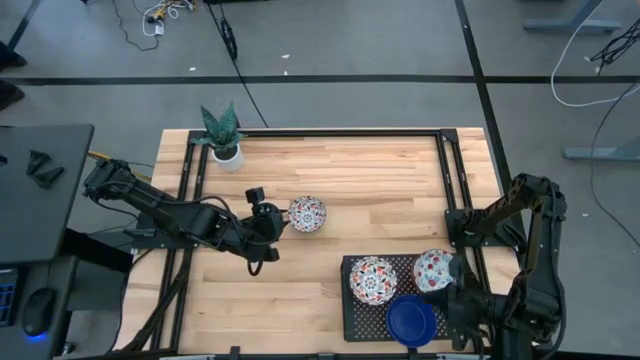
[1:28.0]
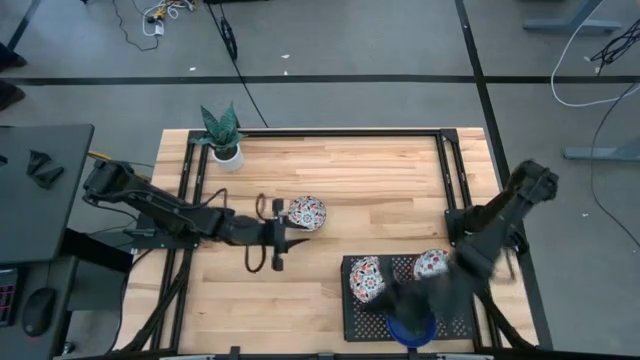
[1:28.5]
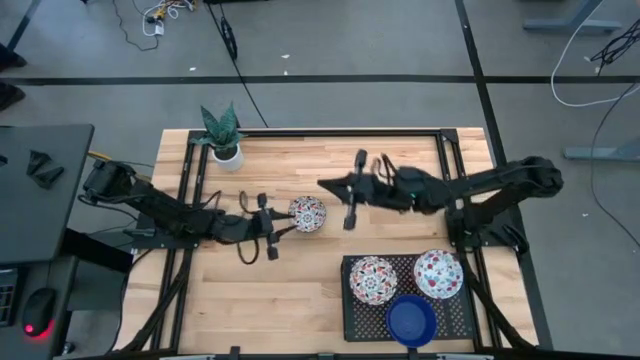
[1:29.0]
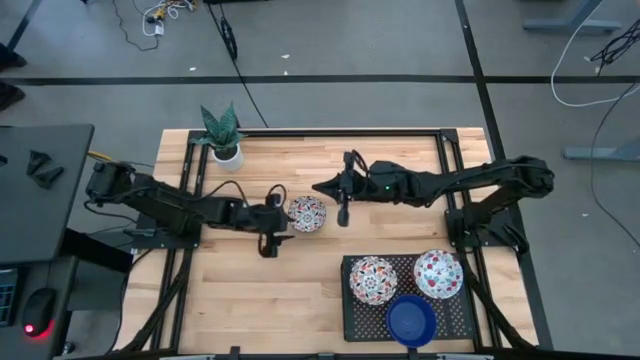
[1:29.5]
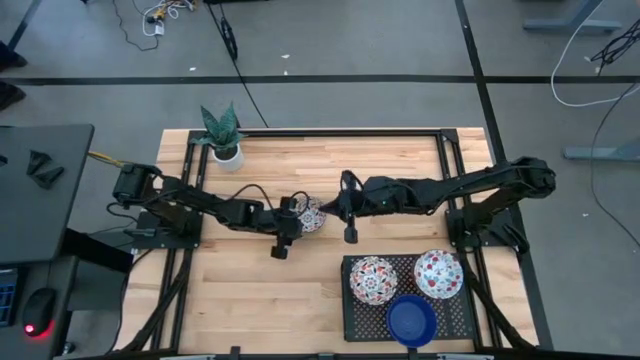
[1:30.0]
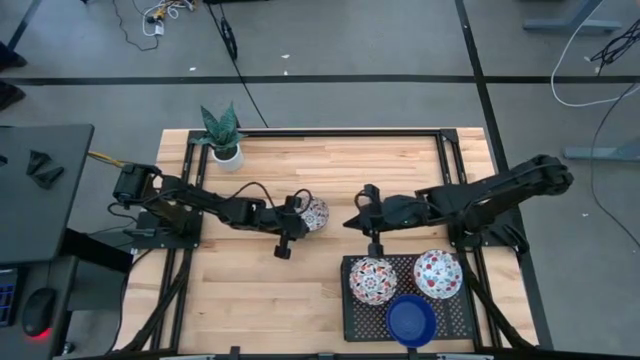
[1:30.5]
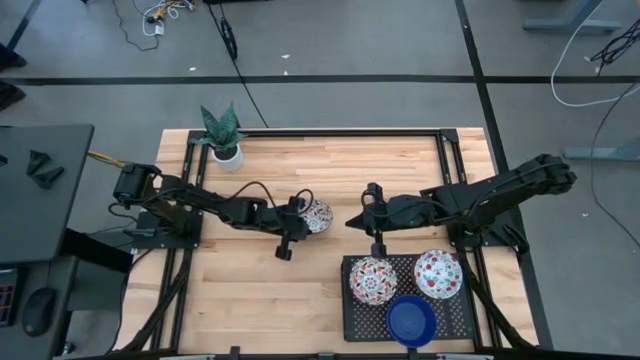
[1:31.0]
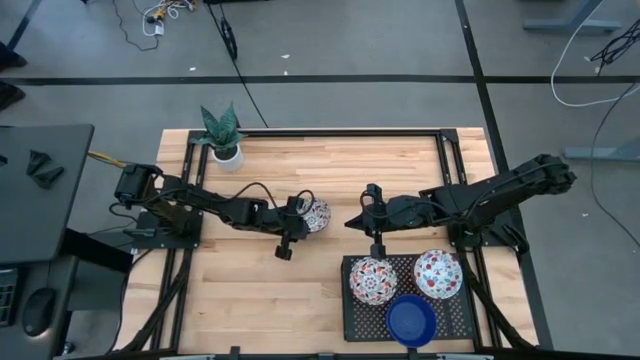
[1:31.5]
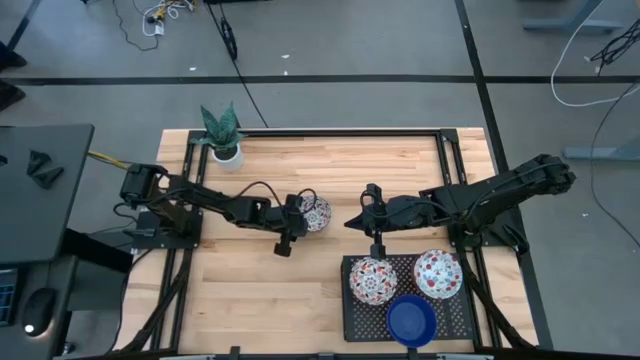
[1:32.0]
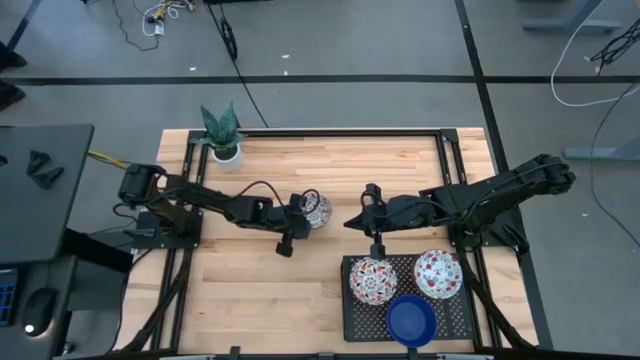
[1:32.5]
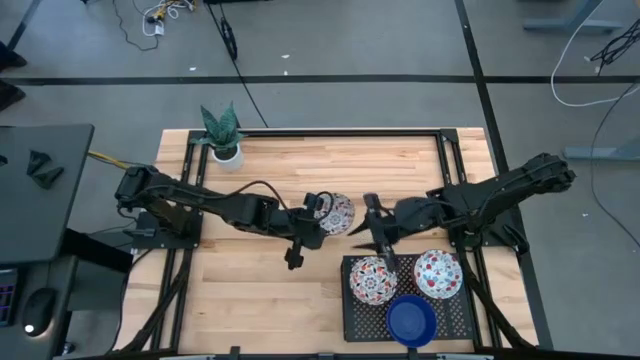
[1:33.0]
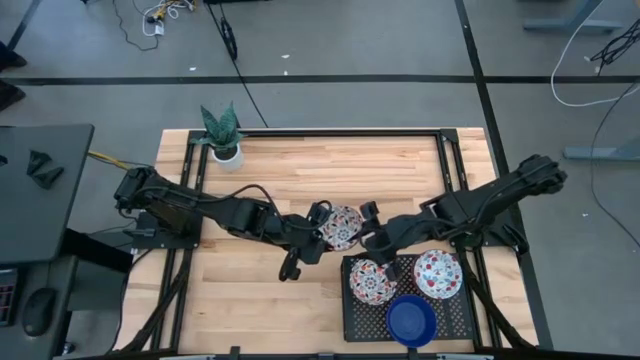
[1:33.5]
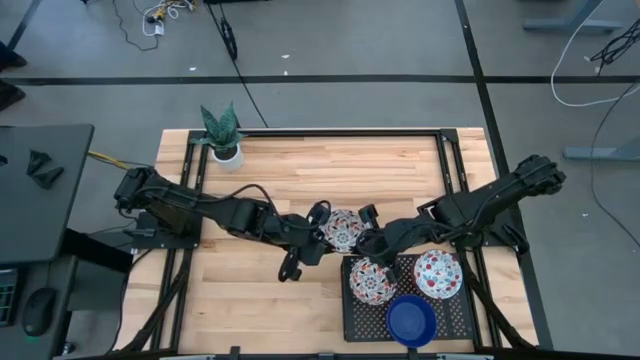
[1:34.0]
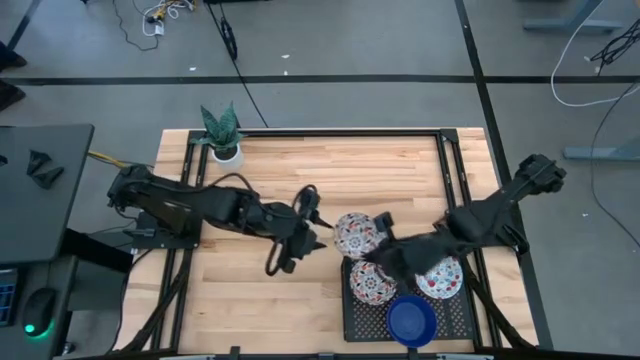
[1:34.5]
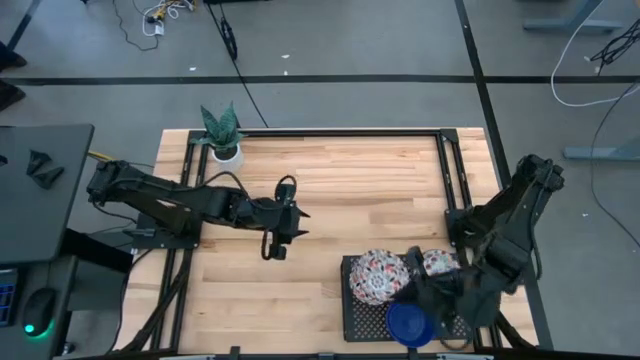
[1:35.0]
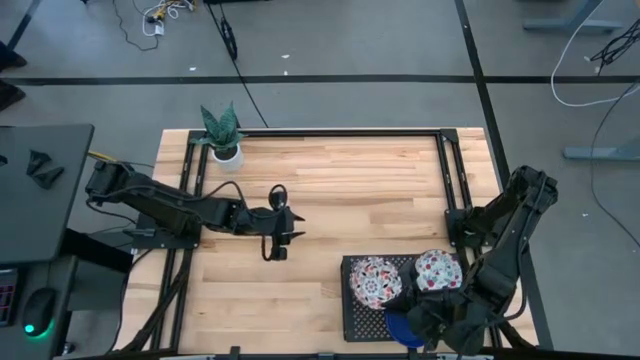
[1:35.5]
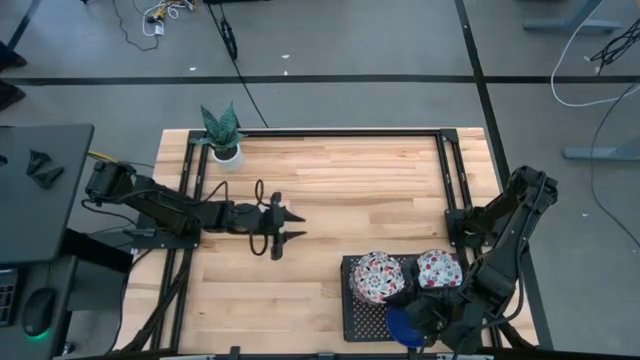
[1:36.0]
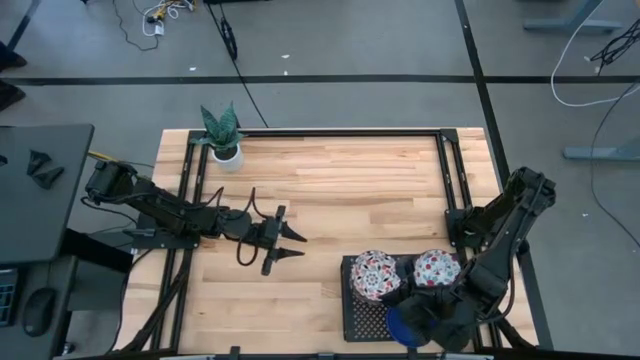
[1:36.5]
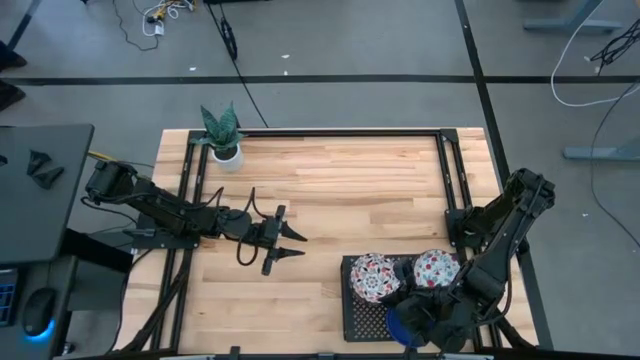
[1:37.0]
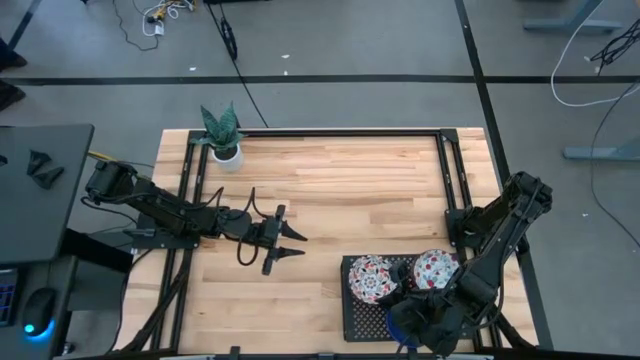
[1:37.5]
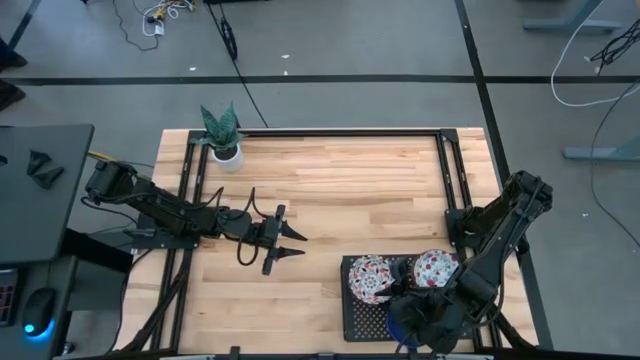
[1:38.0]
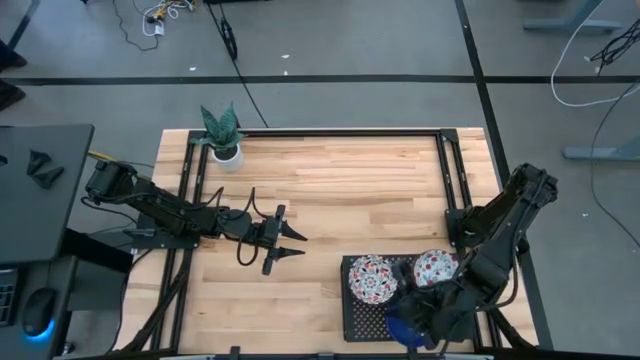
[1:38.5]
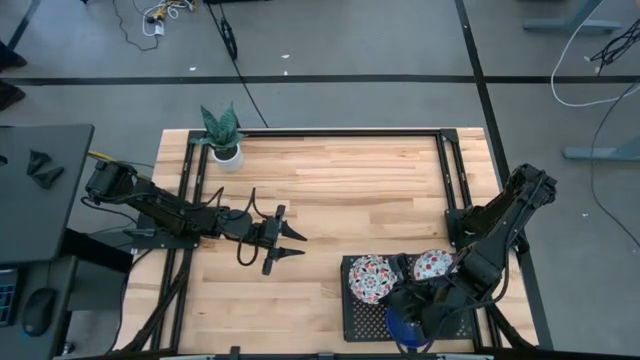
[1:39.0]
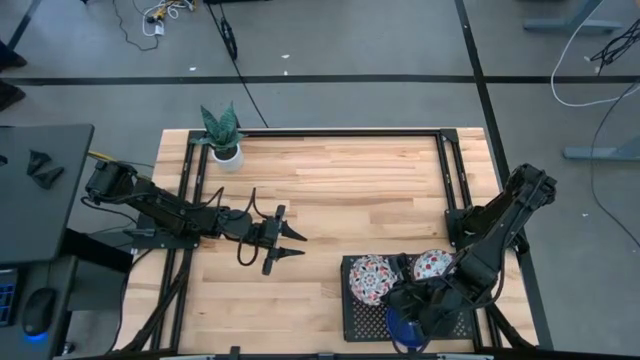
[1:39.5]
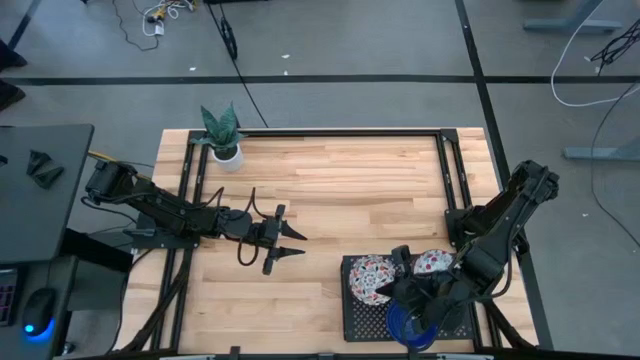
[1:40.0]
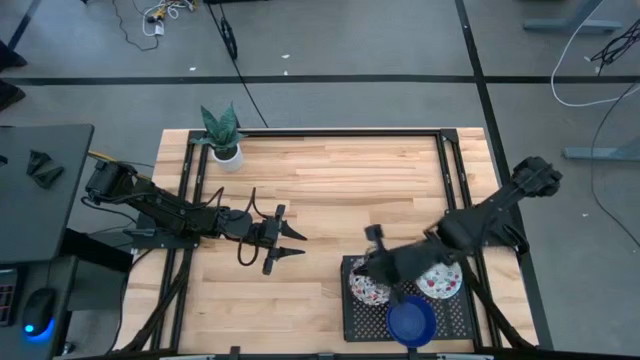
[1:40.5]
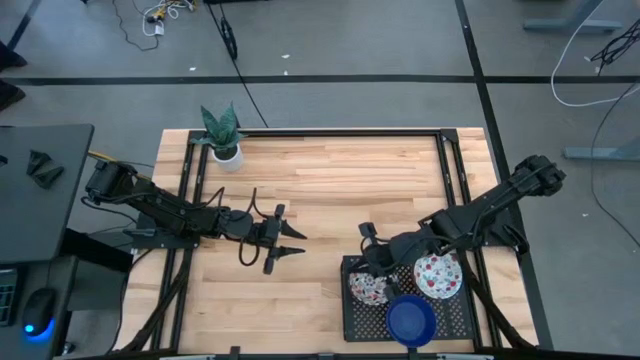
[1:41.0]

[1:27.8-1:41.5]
Task: Pick & Place Mini bowls
Stack the orange patterned bowl on top of the stacked orange patterned bowl on the shelf

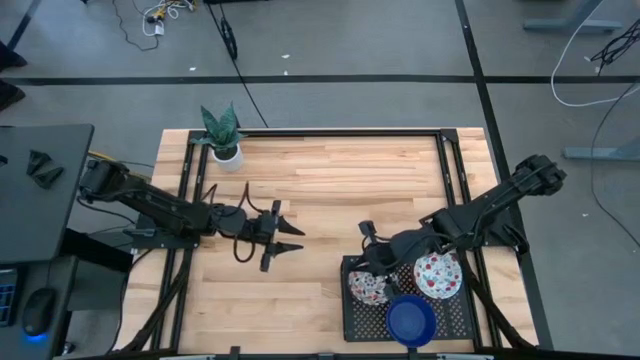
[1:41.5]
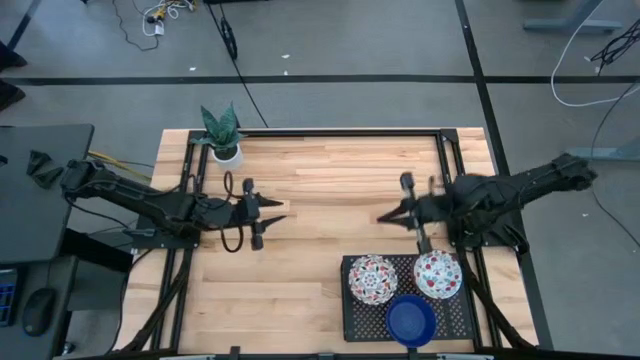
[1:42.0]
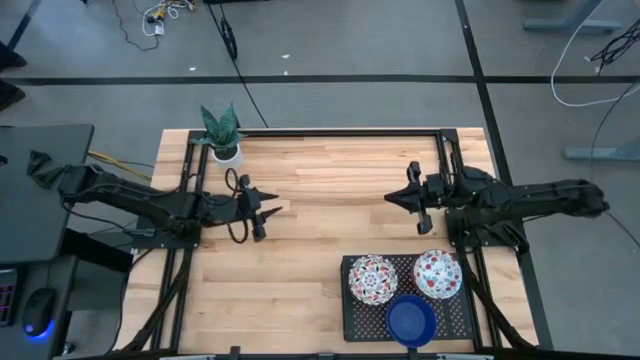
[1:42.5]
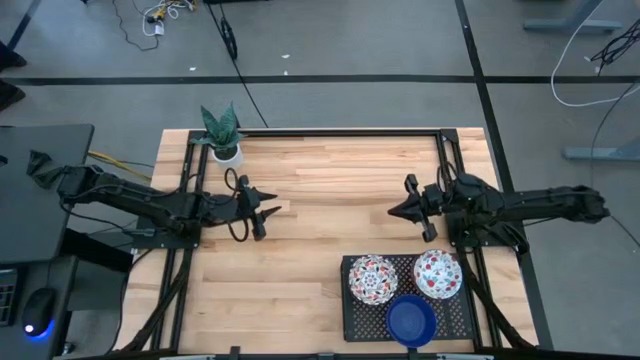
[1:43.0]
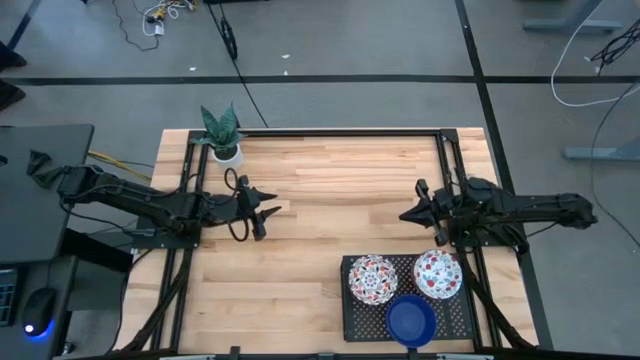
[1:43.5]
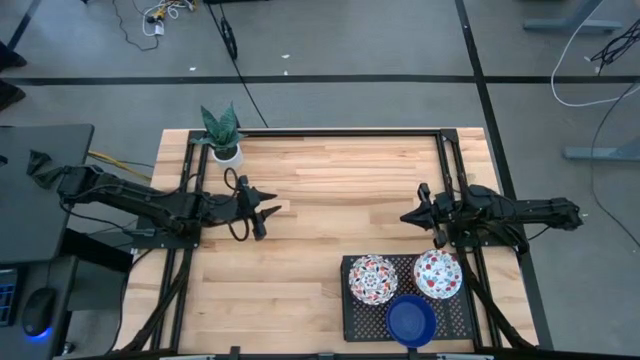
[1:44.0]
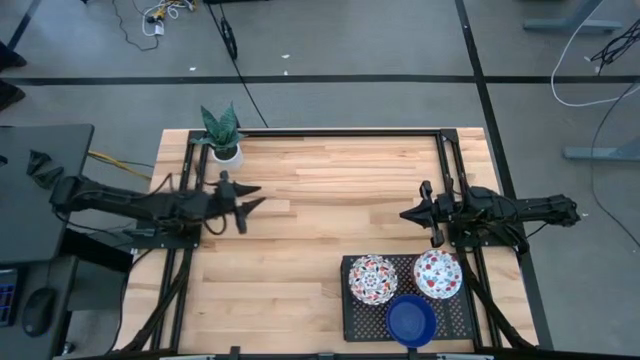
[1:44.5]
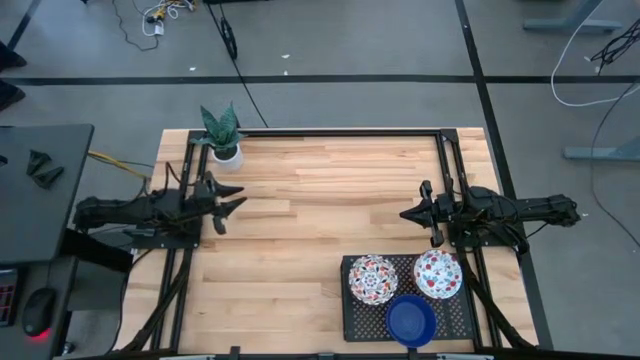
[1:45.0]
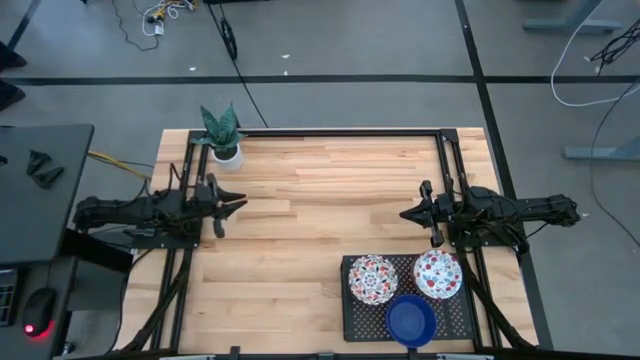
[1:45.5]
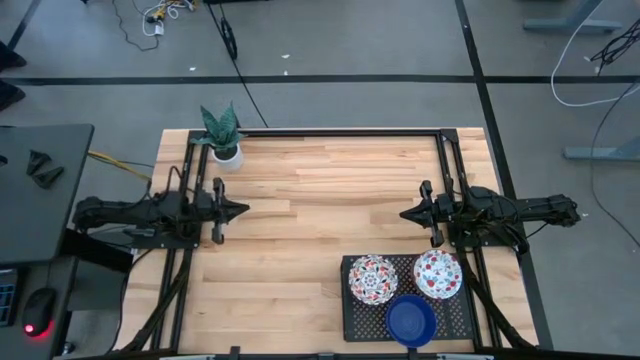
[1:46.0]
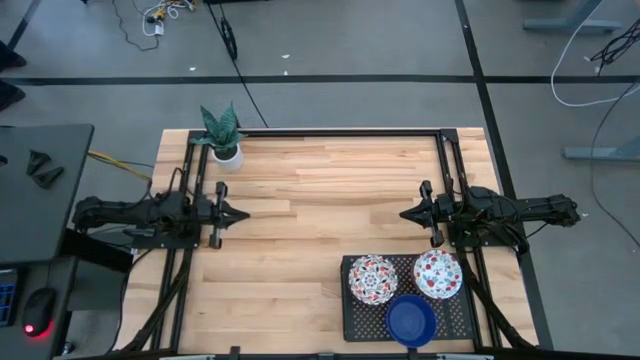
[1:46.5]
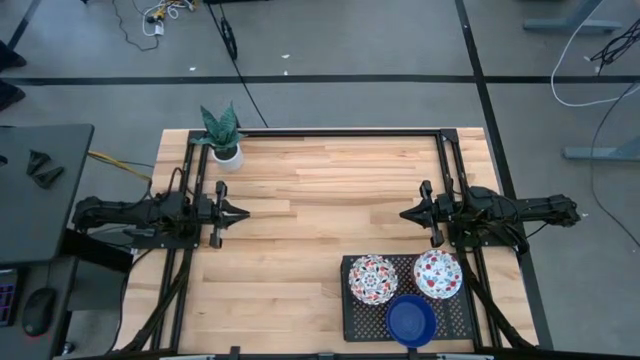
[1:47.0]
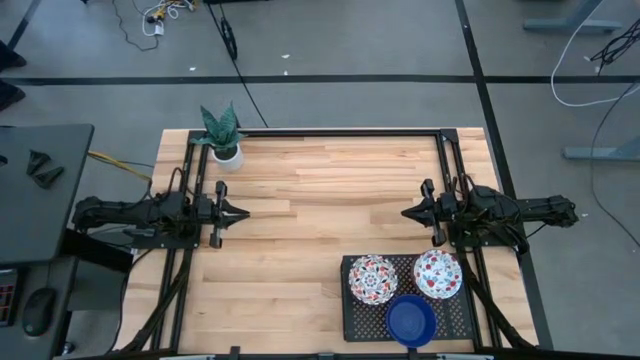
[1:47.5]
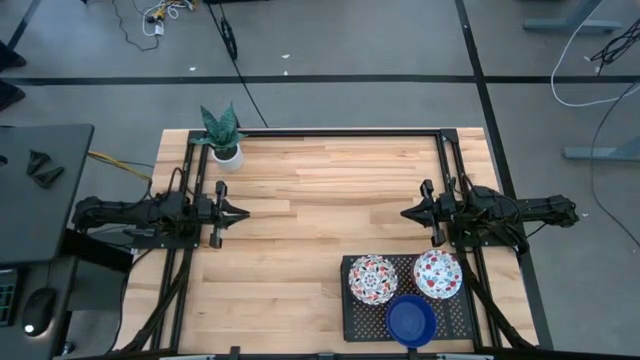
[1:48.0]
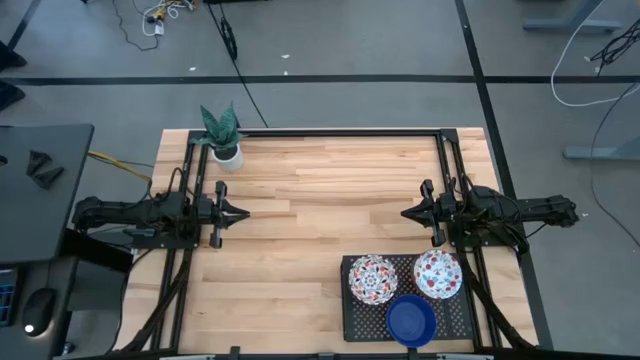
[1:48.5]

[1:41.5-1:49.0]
Return to Home Position
